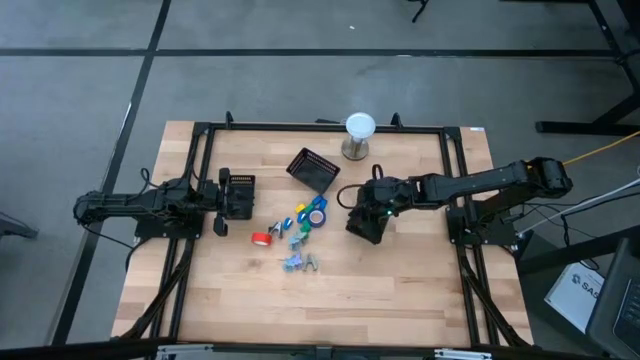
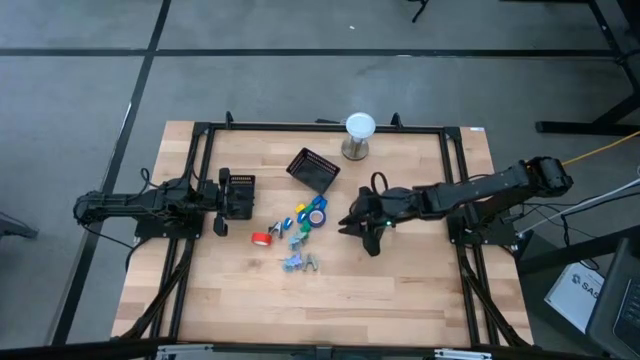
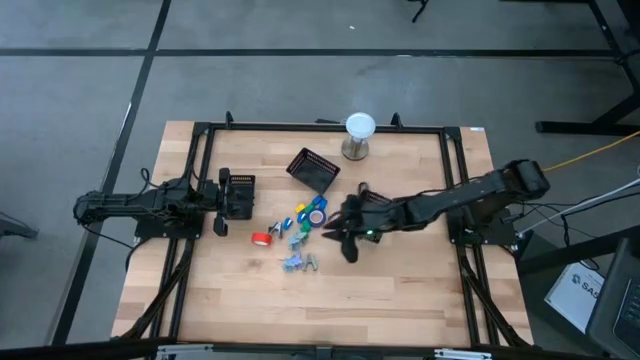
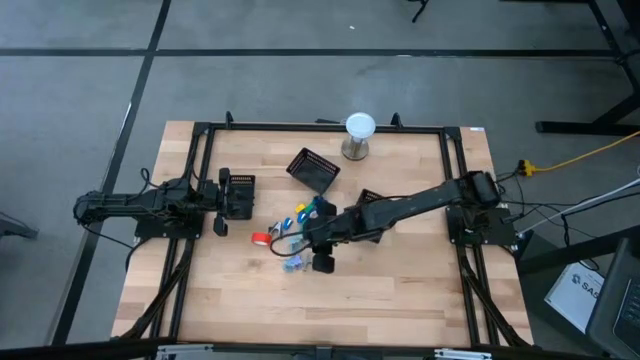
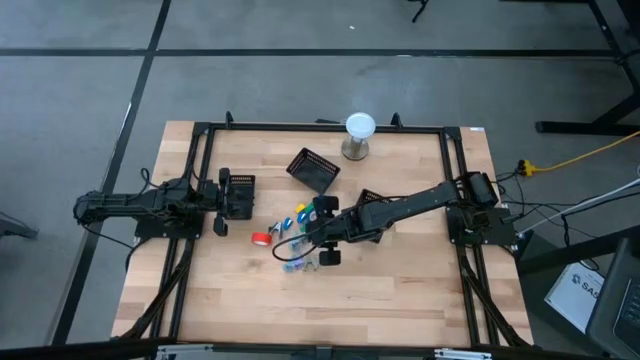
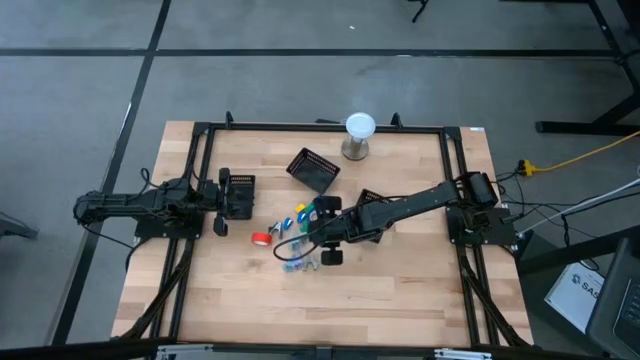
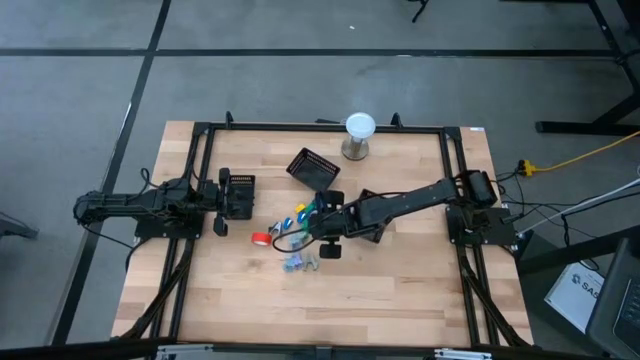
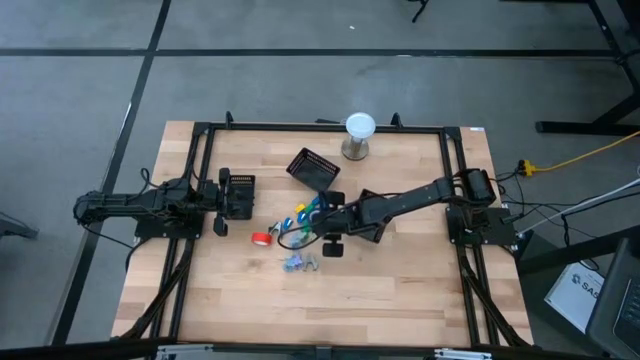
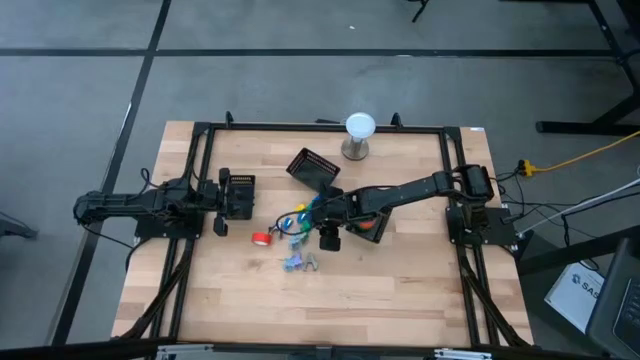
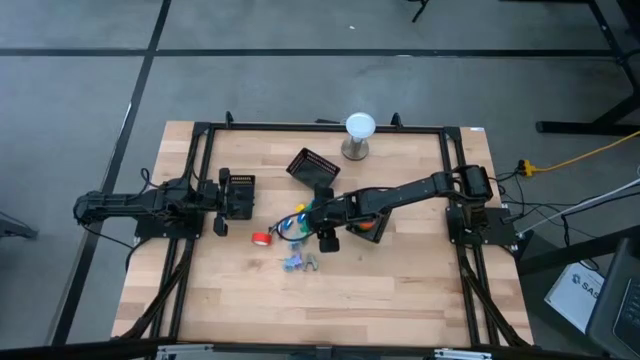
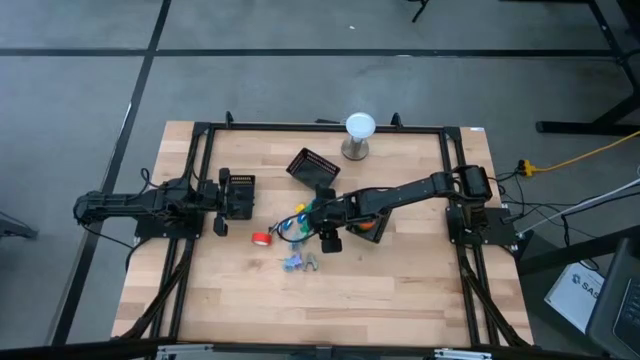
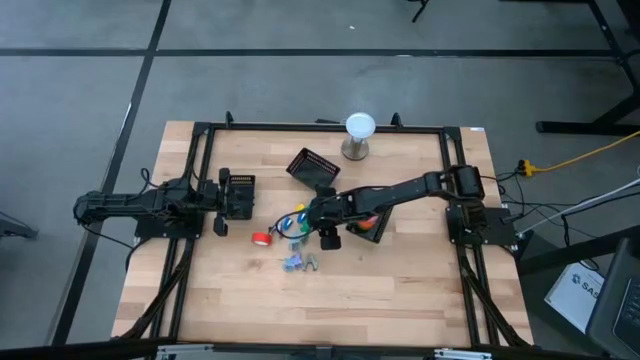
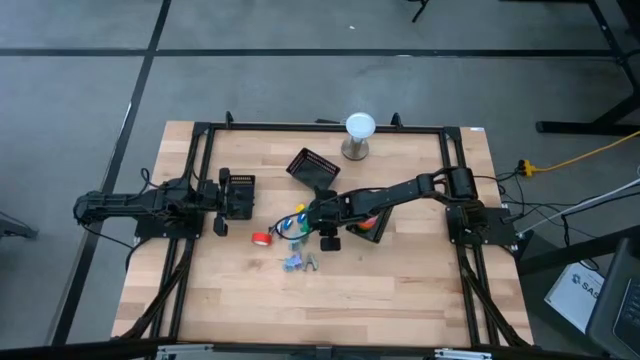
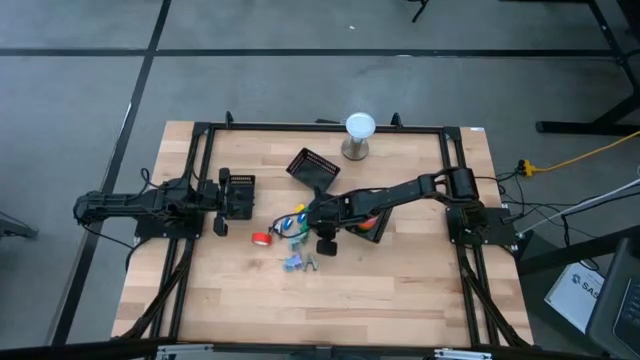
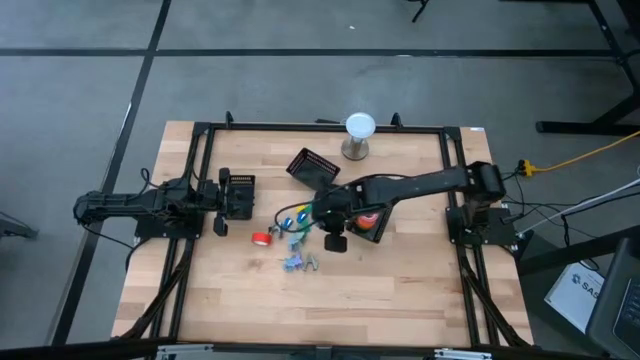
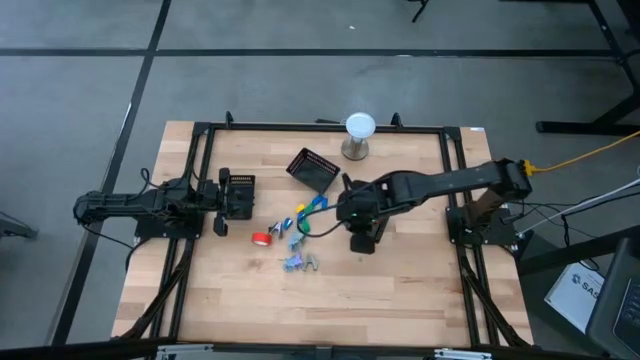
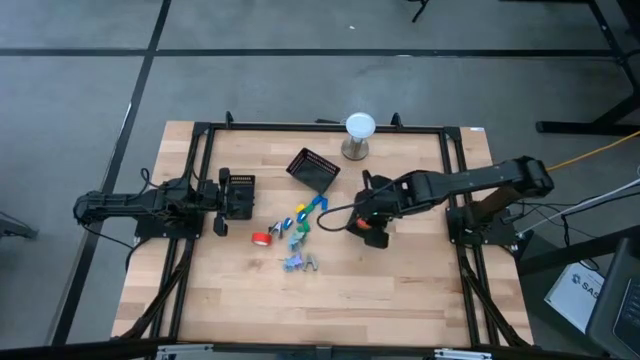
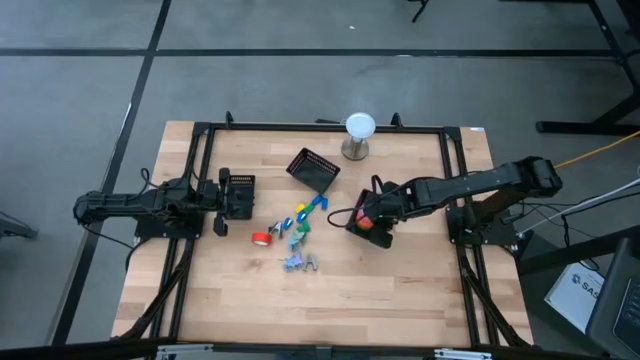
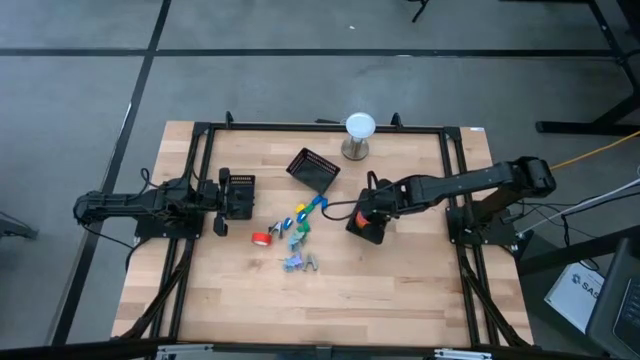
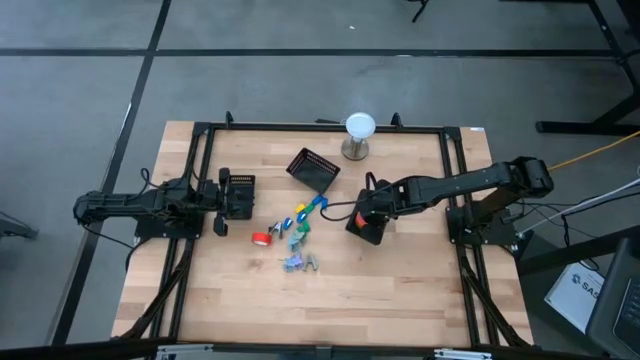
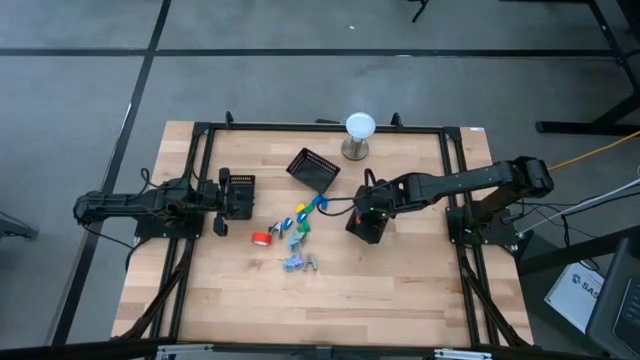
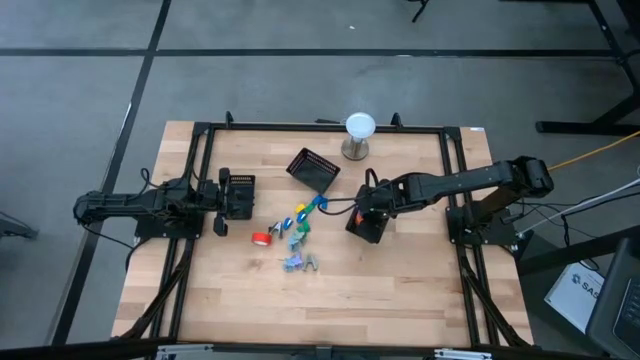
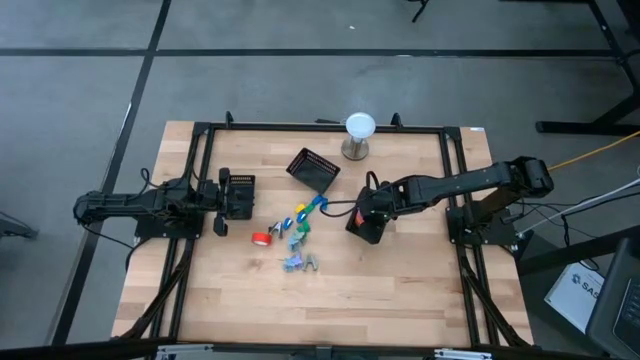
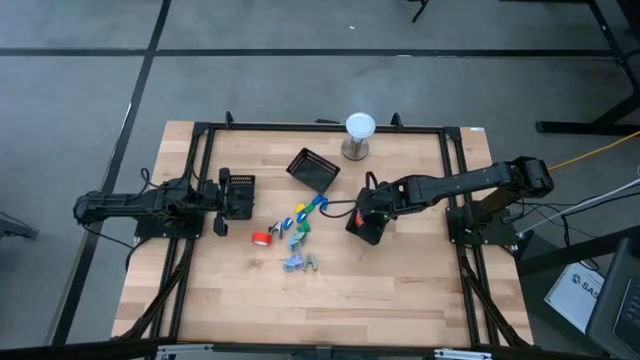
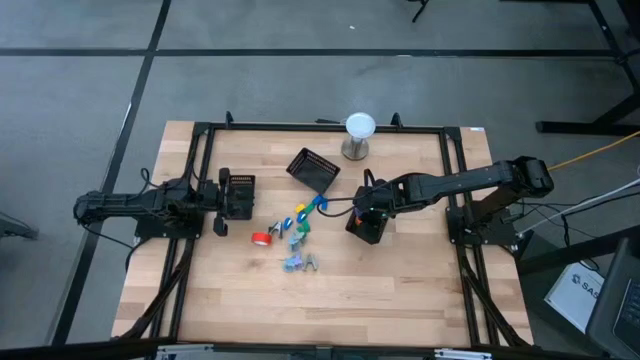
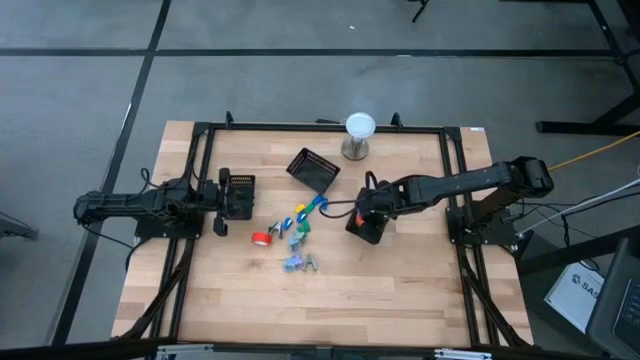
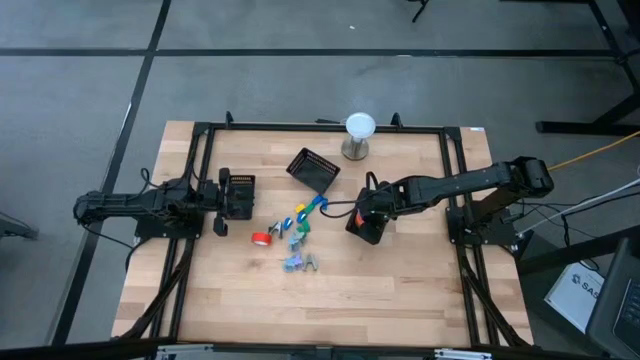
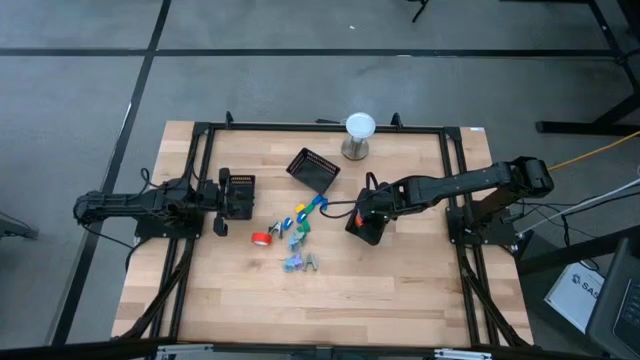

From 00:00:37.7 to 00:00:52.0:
Task: Pick and place Stapler, Stapler remover, tape
Put the blue tape into the right black bin

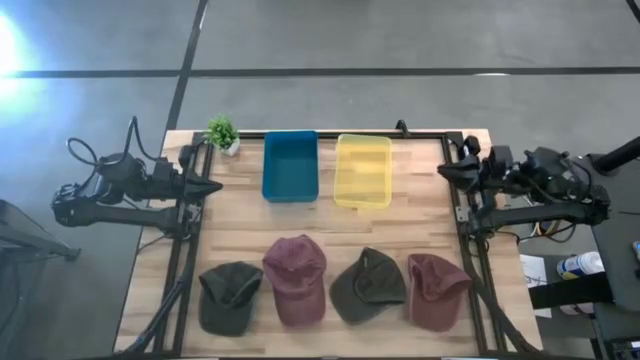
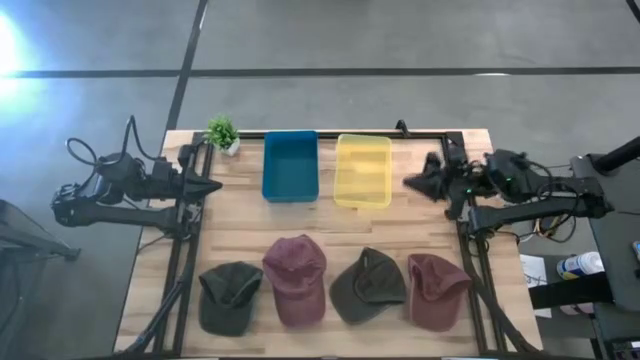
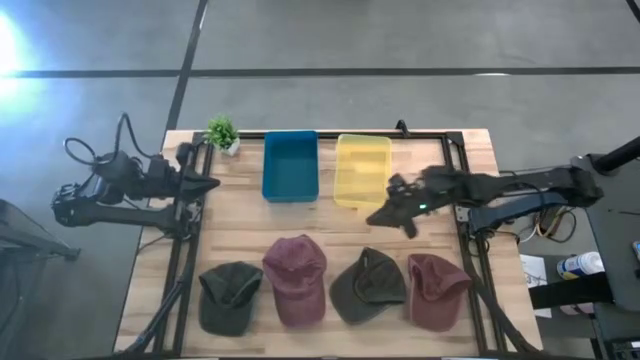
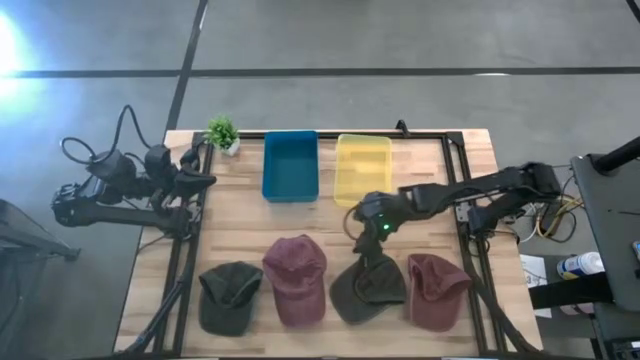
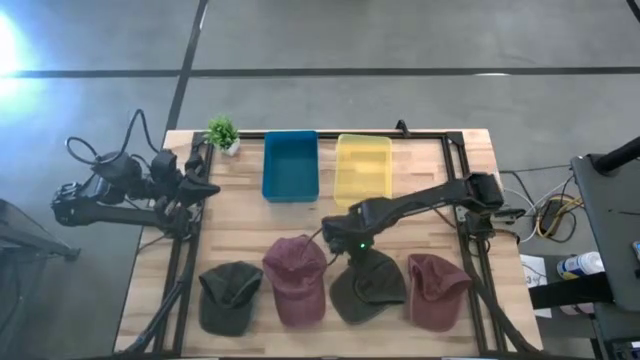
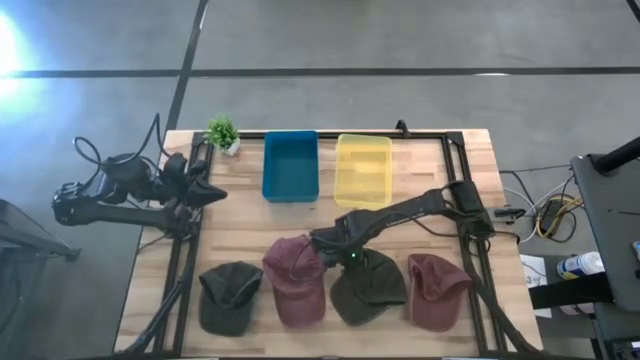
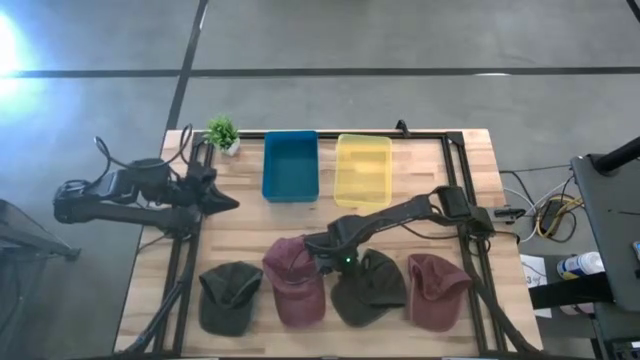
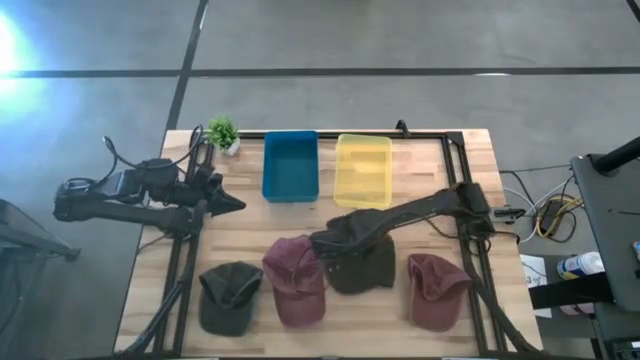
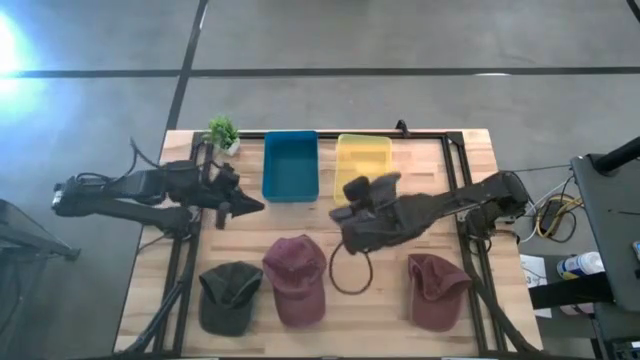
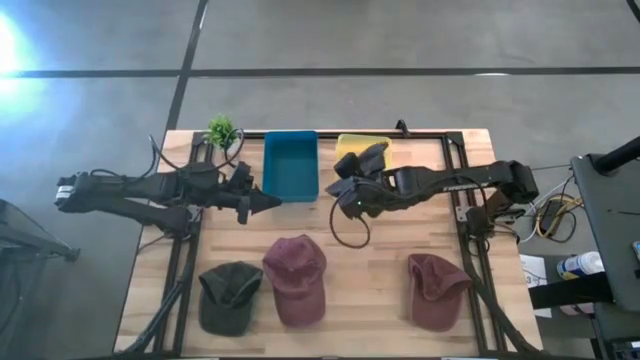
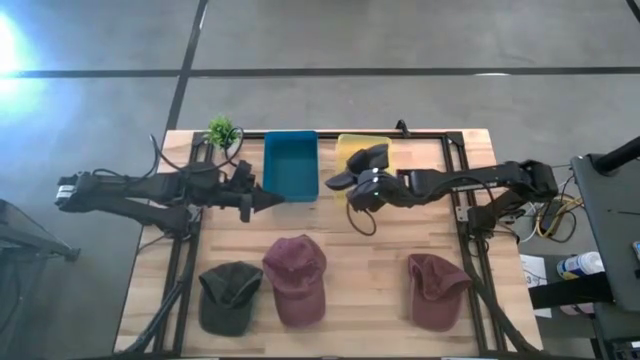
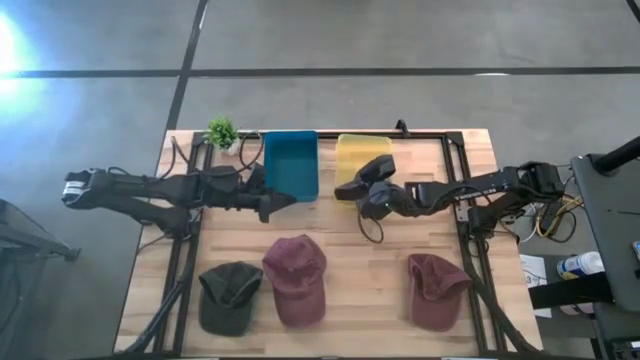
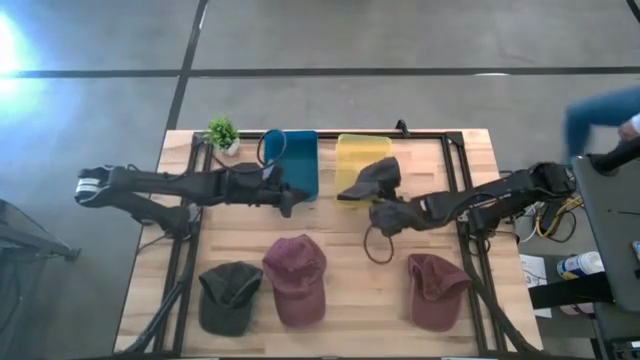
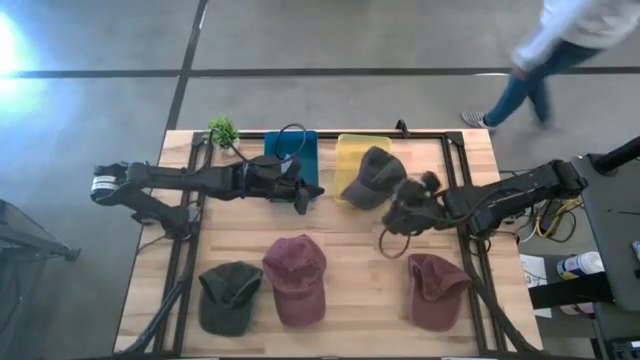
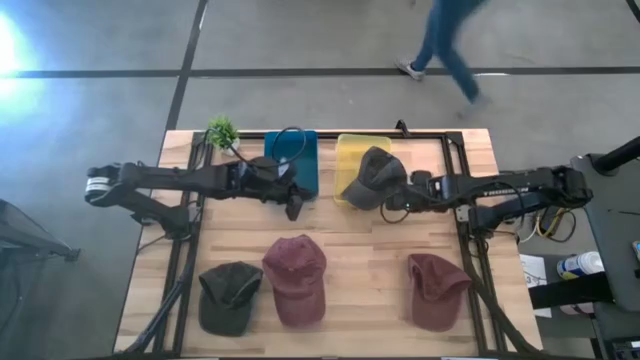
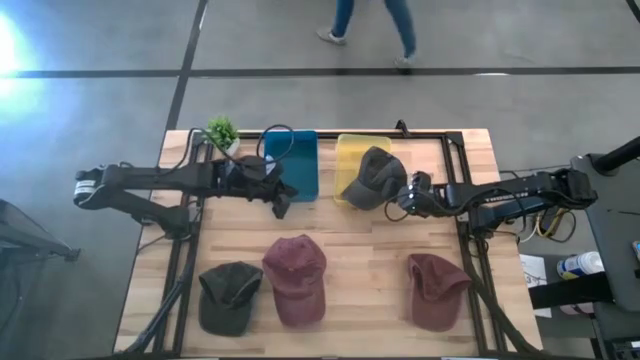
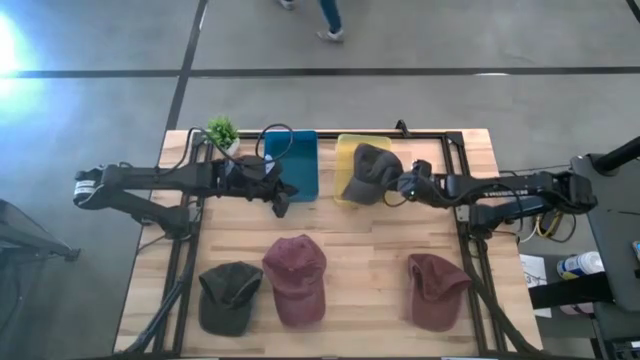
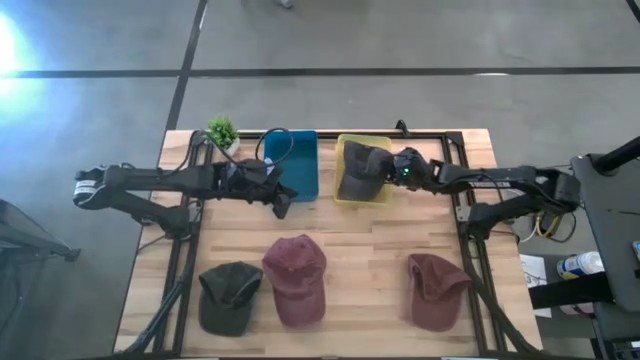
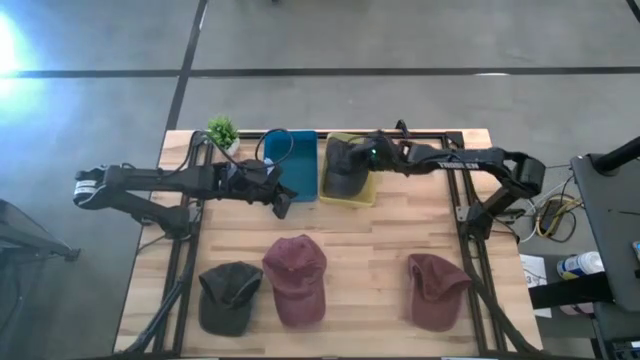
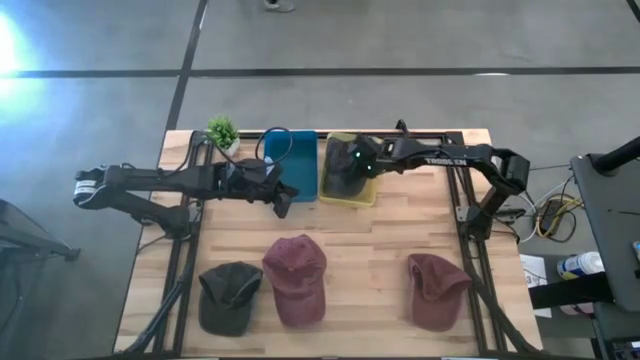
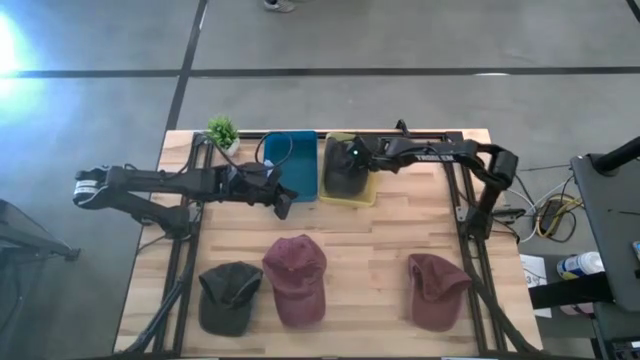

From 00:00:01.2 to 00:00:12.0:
Task: Pick & Place hat
Put the right black cap into the yellow bin
